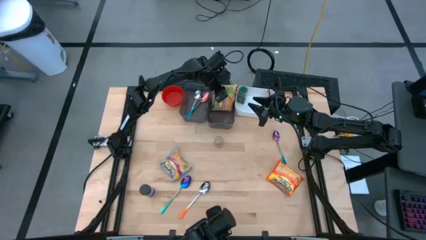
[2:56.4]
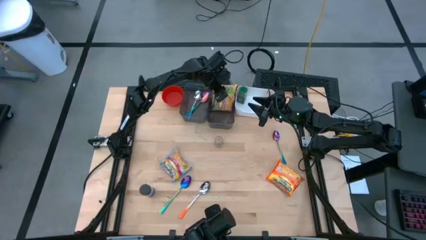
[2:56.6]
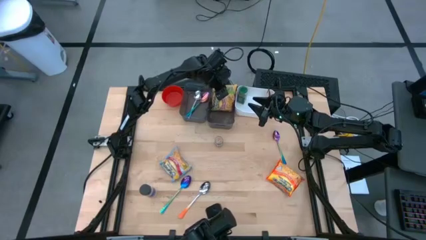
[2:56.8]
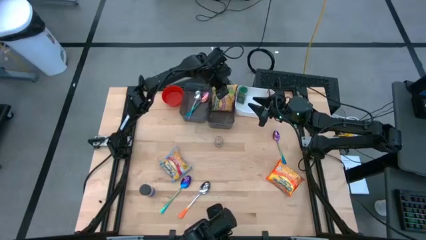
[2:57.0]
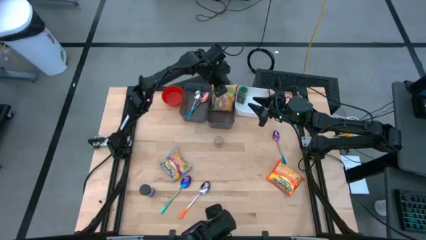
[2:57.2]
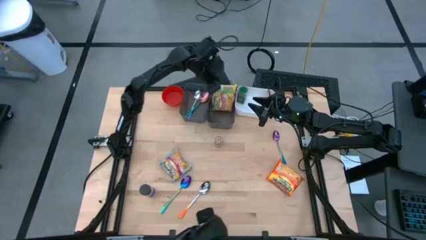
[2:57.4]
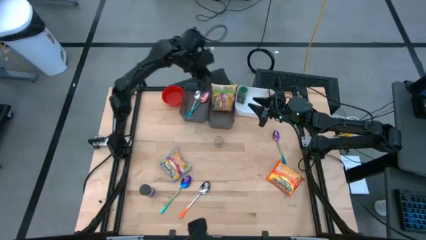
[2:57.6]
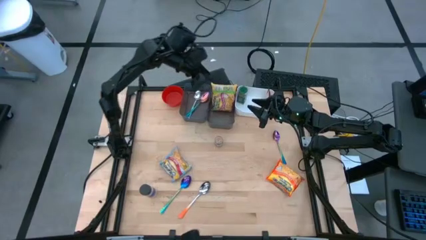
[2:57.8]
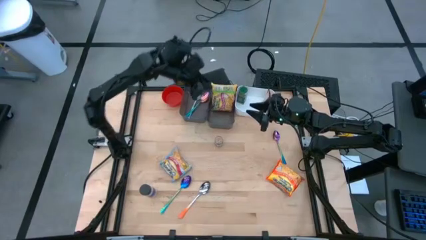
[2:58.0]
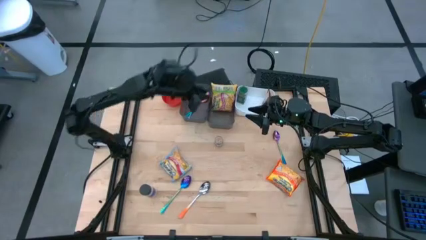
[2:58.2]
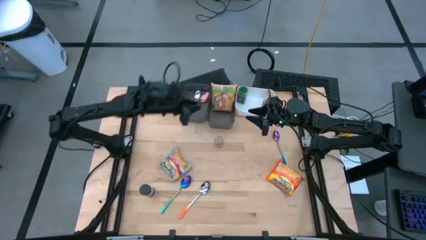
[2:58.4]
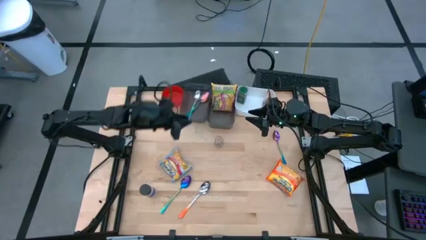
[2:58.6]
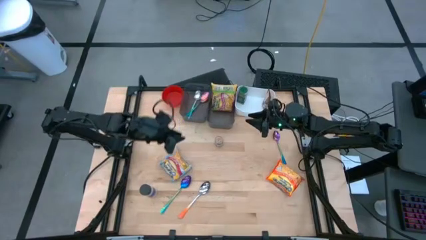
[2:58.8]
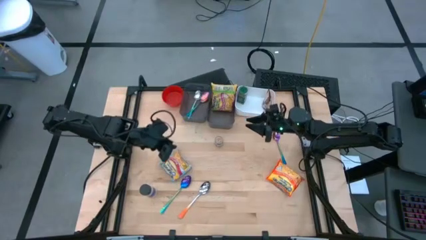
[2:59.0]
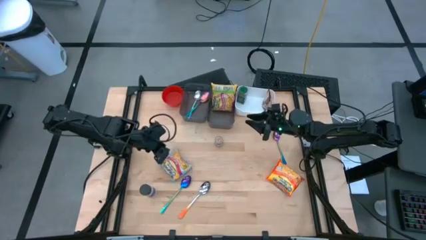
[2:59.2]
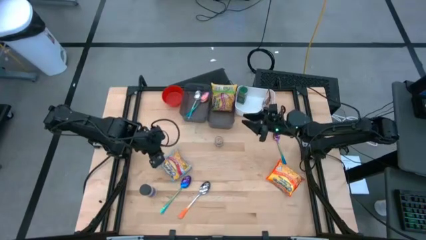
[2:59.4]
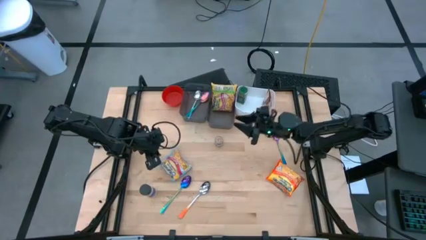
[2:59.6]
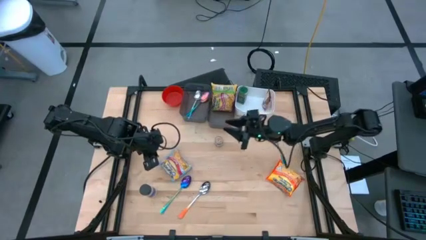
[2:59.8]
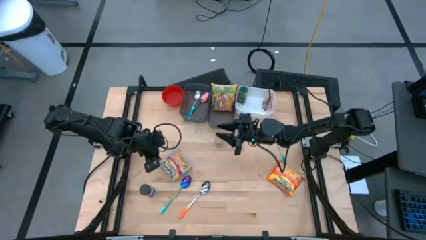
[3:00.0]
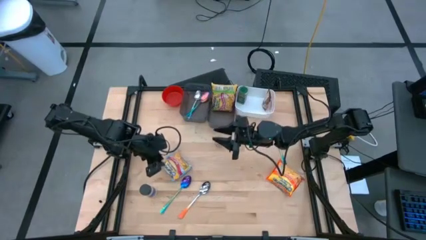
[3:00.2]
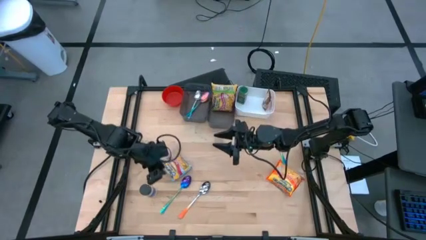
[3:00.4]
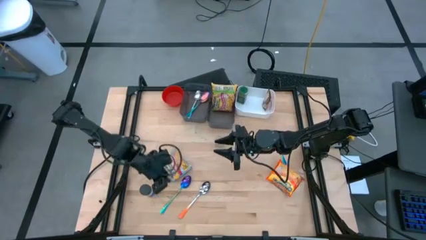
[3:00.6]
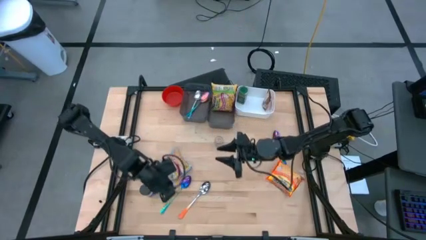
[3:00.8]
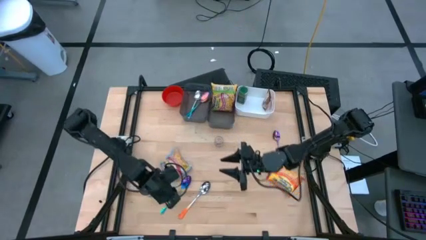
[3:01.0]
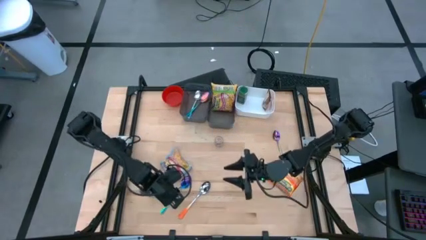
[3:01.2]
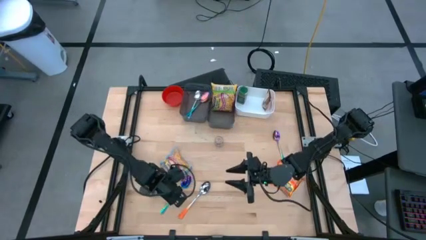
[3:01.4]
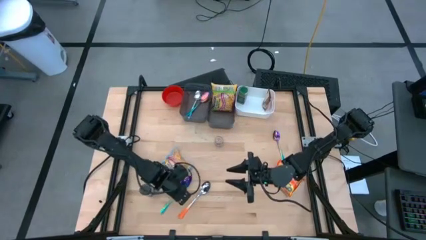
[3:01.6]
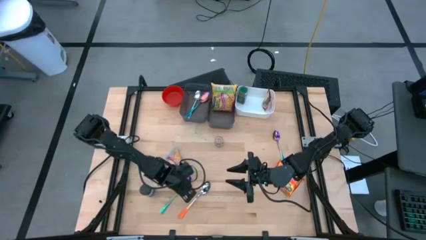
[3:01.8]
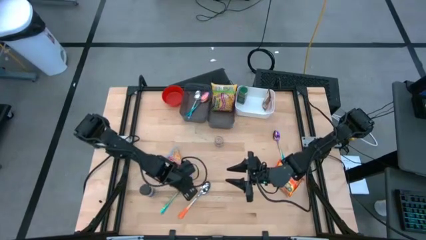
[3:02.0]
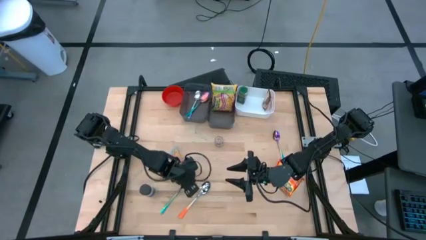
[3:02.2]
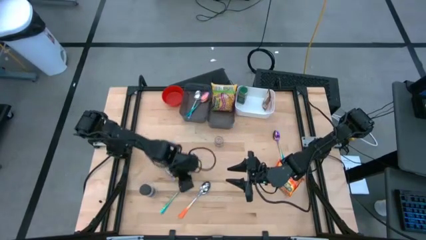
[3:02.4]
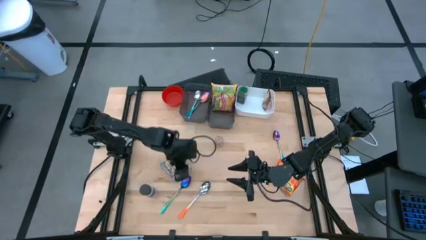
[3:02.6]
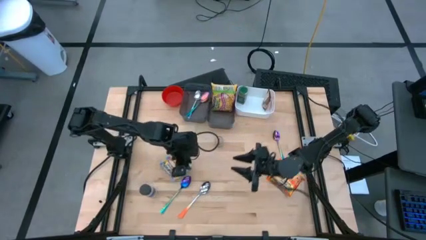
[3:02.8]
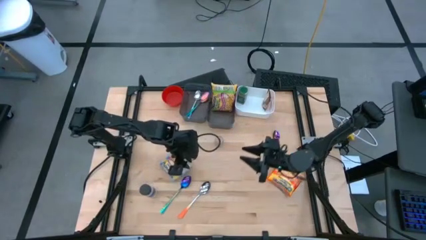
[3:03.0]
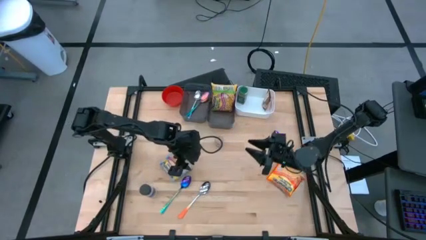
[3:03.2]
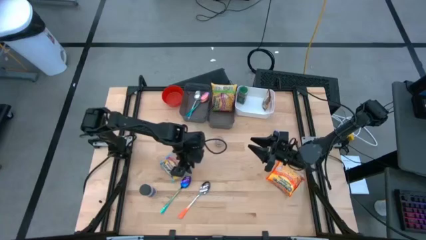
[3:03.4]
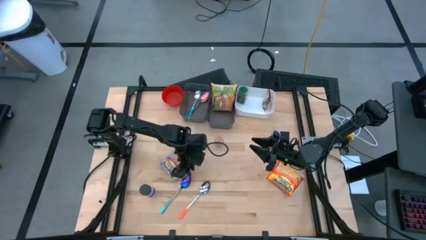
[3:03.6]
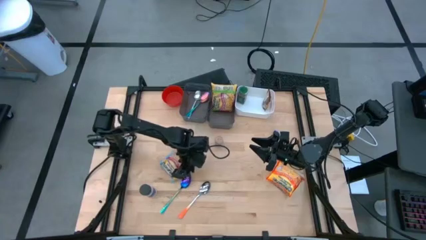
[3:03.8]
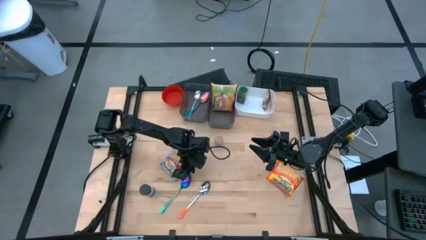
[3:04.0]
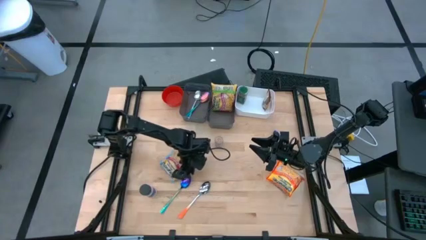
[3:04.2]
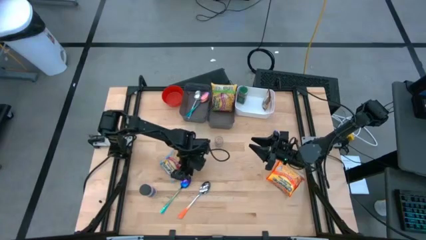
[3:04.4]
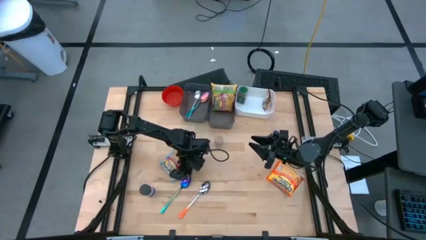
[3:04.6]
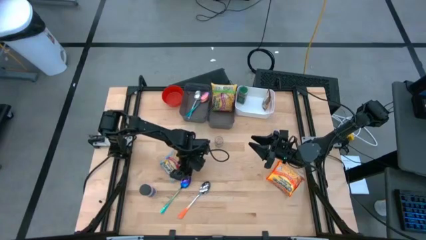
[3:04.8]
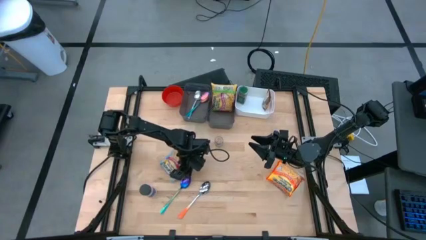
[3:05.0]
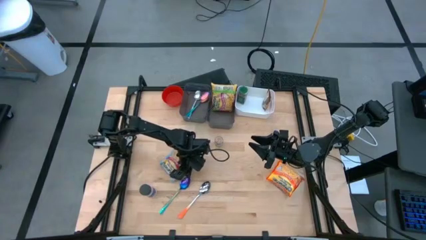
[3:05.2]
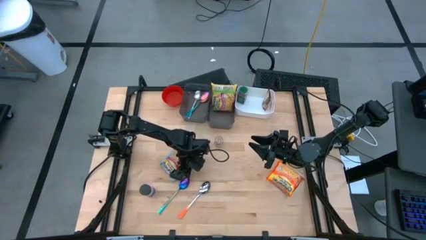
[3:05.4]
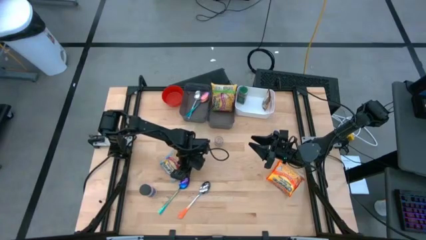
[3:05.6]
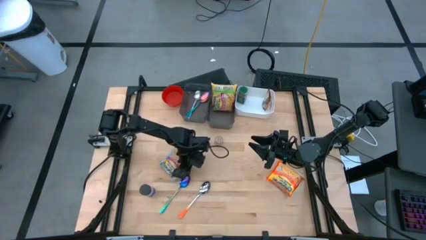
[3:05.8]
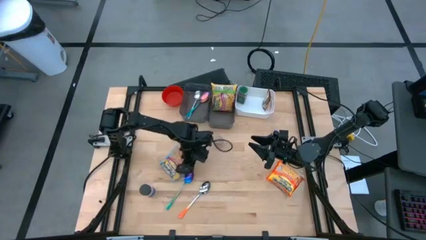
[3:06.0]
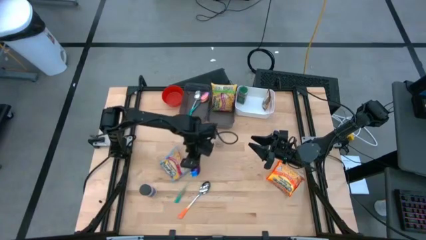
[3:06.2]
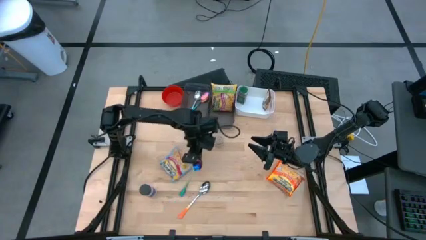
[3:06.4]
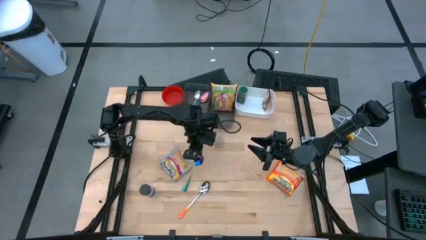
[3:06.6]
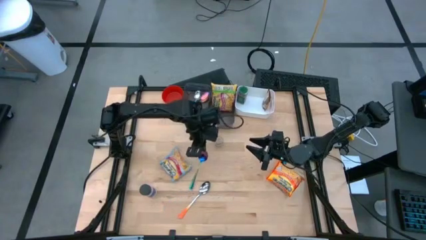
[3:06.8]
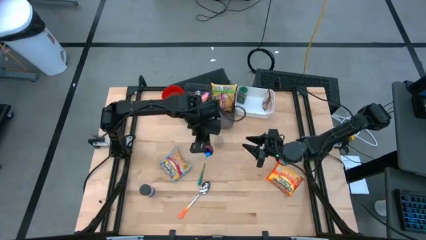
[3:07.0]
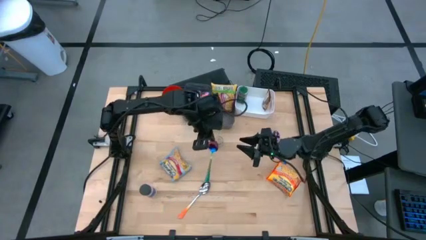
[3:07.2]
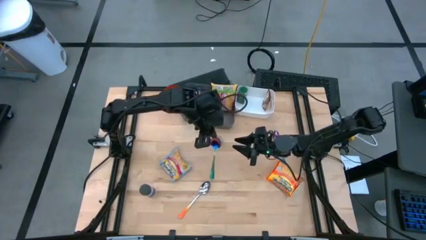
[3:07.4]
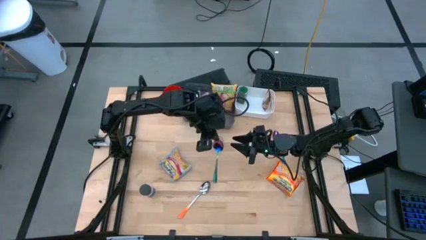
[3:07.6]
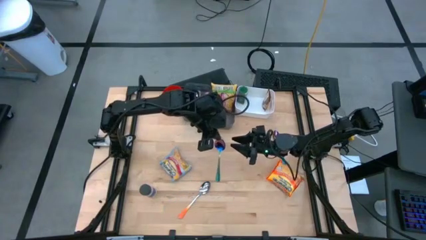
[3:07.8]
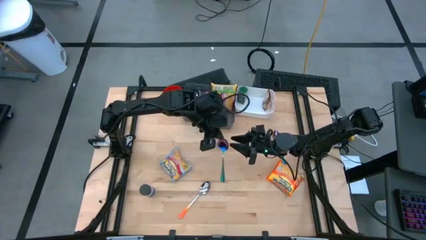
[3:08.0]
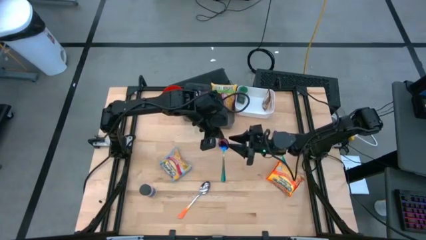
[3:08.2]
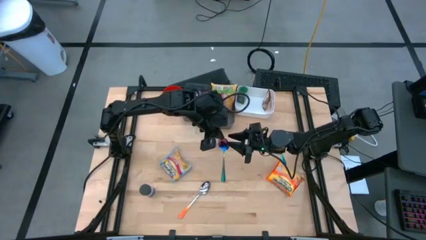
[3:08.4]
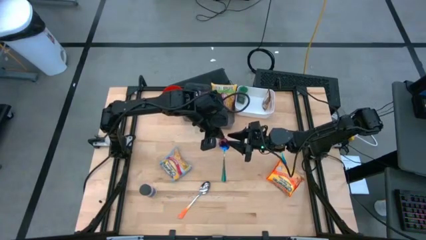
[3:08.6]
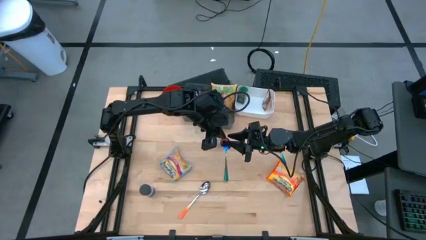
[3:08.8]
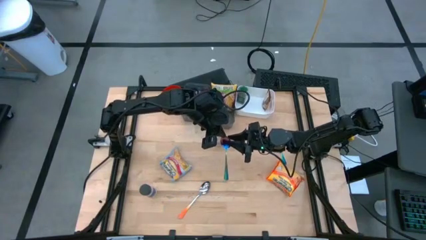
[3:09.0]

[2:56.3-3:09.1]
Task: Pick & Place Food Item
Put the bottom purple and blue spoon into the left black bin

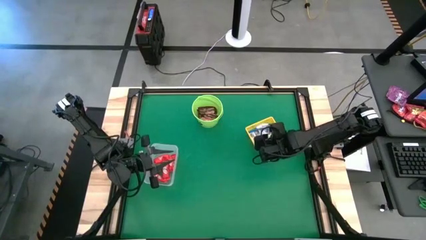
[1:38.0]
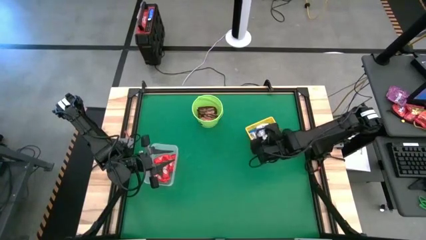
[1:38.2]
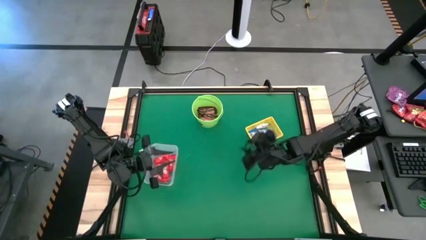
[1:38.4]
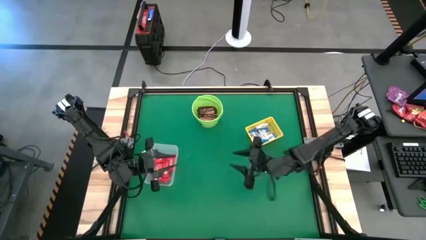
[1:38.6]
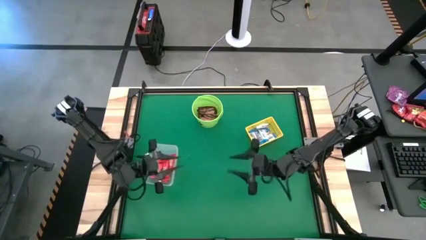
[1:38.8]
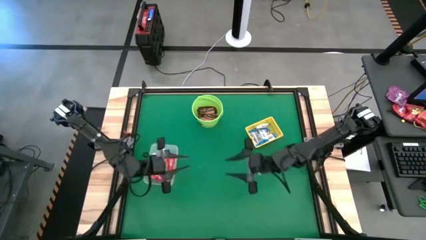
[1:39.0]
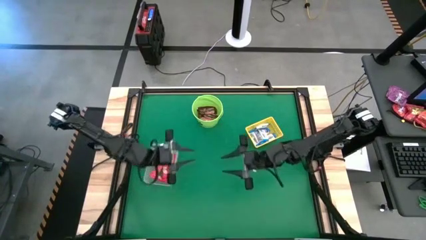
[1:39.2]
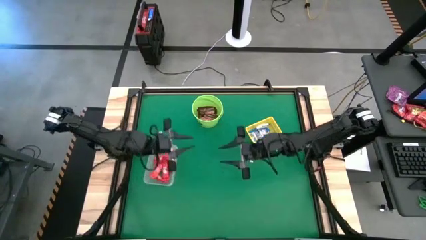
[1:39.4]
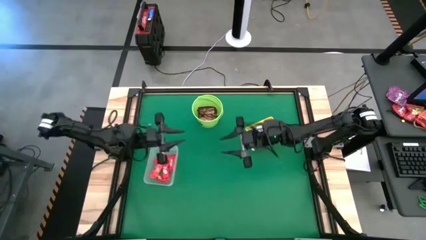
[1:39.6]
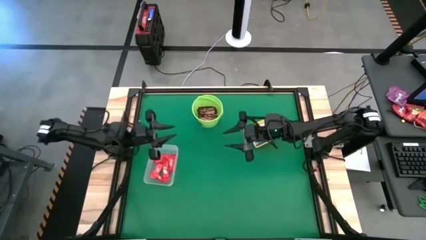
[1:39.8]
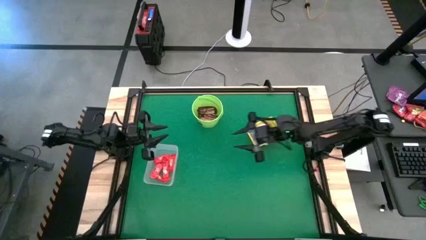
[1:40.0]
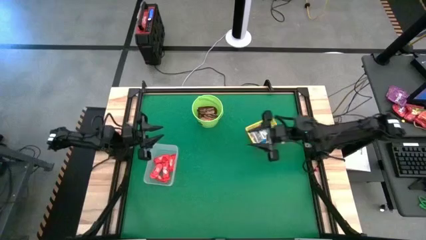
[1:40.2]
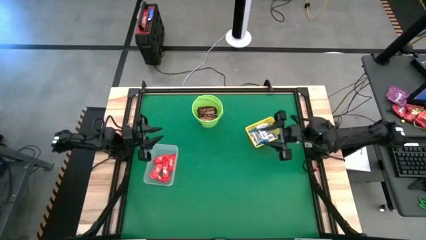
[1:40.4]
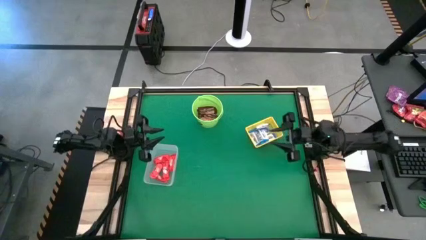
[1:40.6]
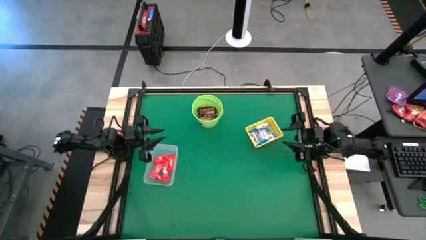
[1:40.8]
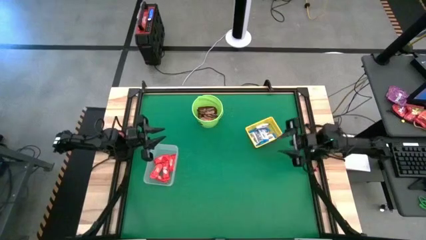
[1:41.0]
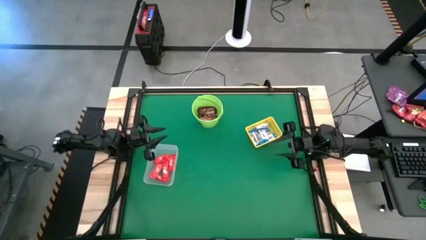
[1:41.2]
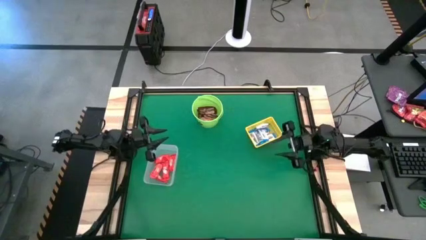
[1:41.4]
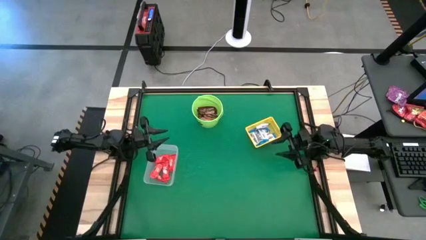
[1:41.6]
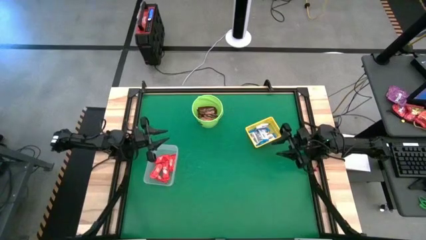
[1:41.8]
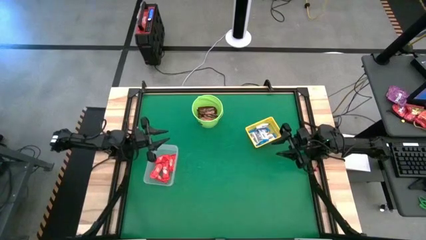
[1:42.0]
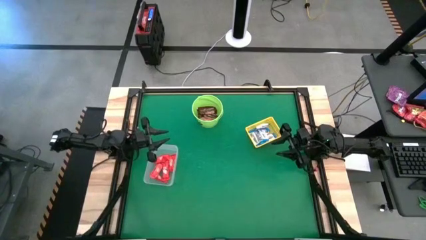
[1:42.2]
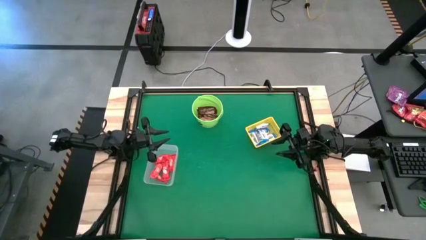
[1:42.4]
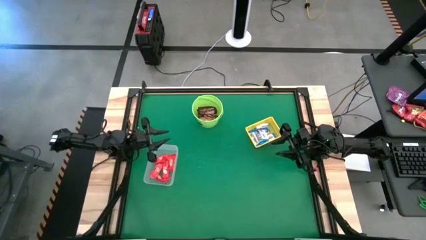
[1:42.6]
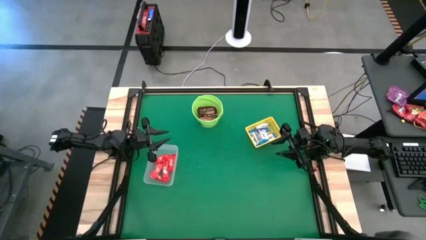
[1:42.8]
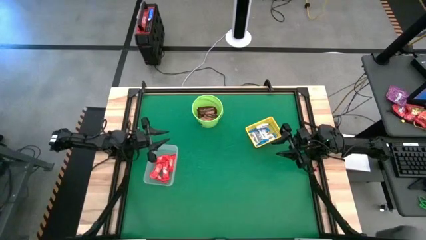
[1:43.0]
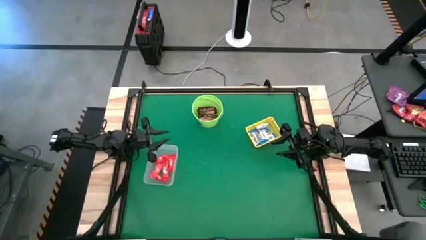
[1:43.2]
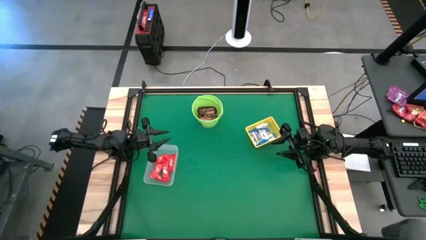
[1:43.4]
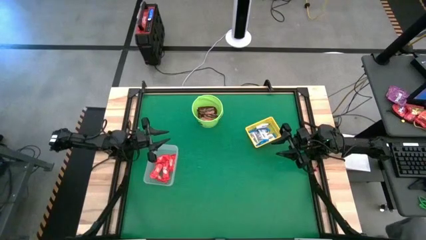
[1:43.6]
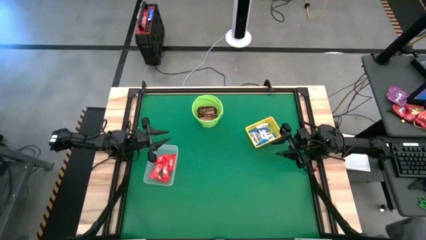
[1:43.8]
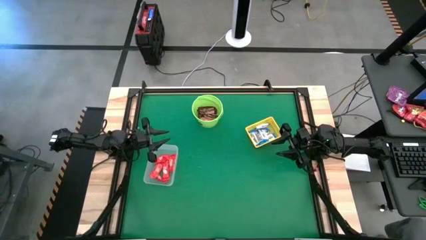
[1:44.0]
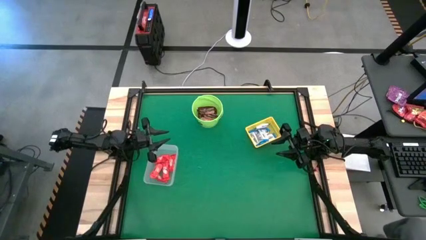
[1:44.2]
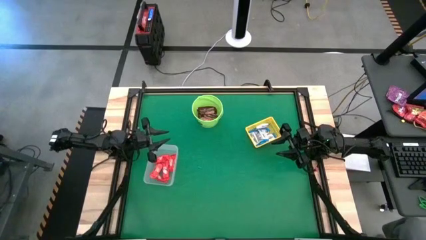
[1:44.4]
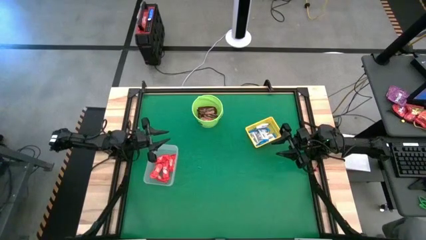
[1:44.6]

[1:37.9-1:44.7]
Task: Sort candy by brand, put in halloween buckets
Return to Home Position
